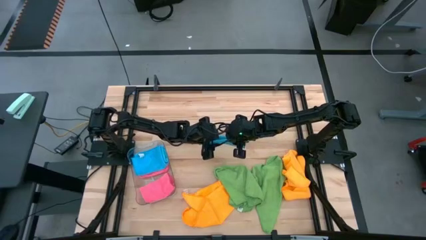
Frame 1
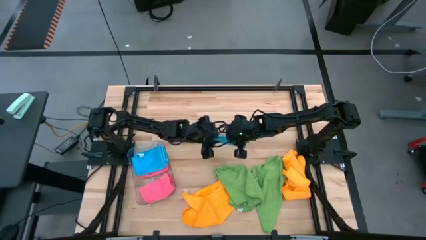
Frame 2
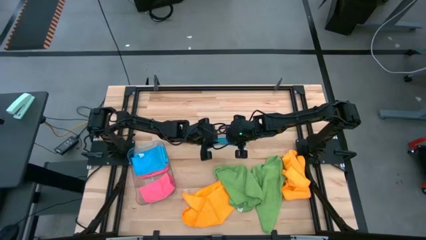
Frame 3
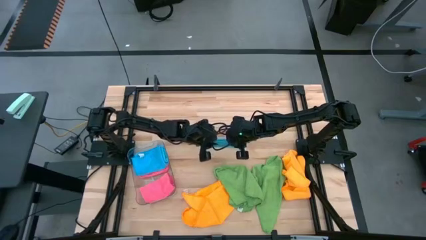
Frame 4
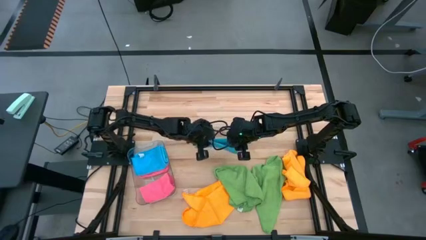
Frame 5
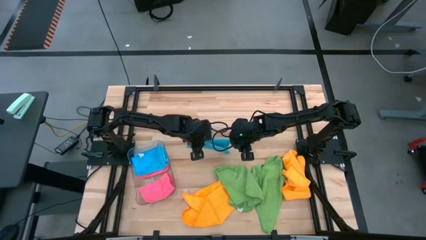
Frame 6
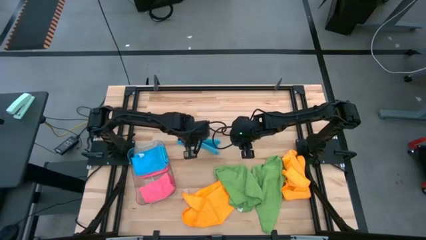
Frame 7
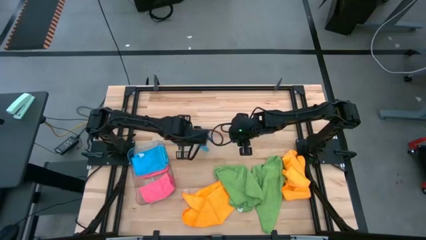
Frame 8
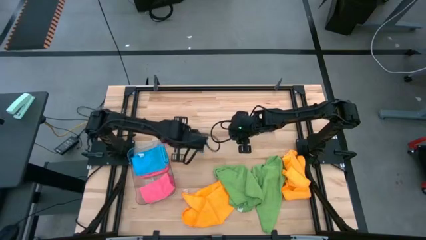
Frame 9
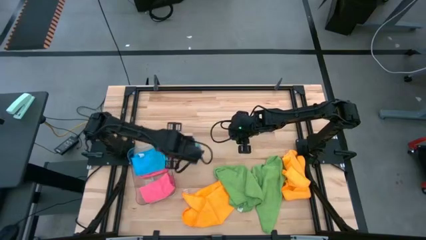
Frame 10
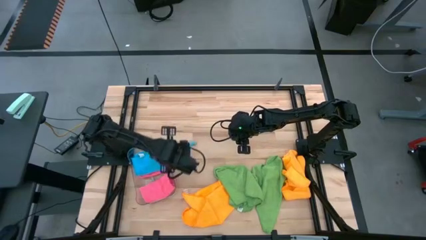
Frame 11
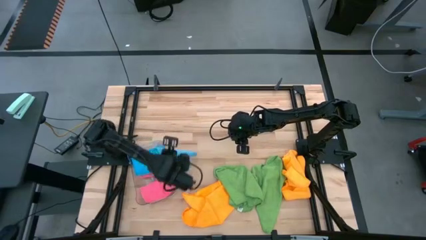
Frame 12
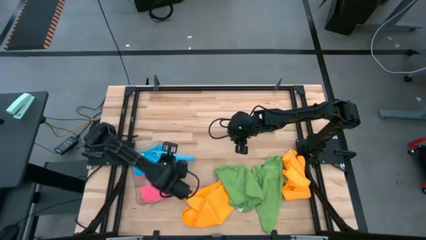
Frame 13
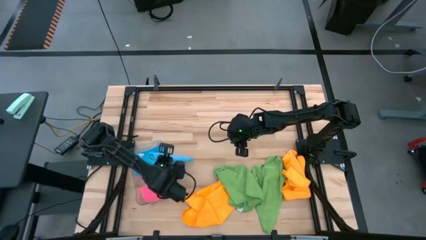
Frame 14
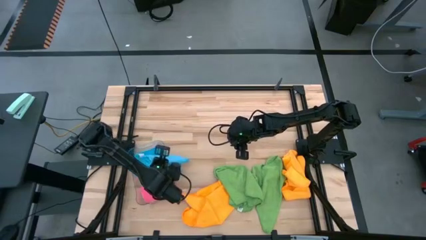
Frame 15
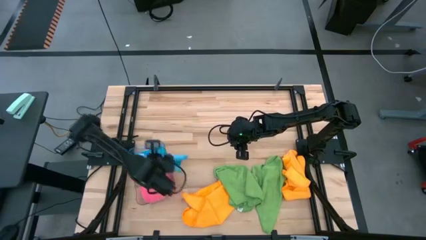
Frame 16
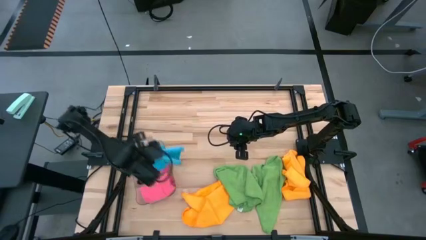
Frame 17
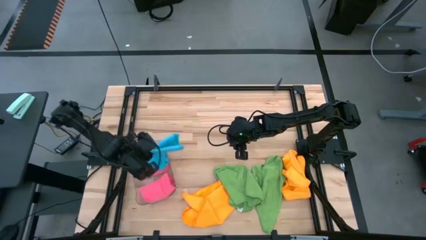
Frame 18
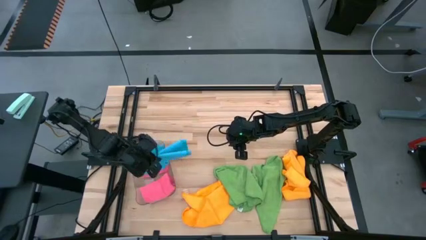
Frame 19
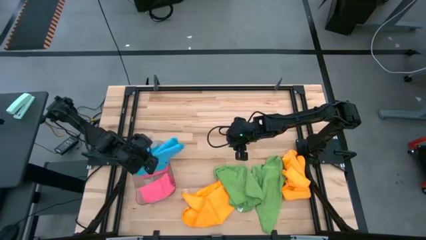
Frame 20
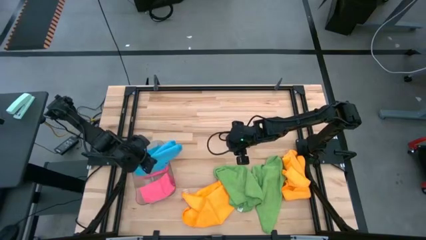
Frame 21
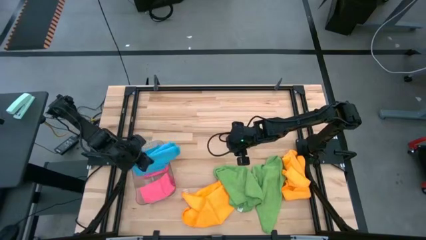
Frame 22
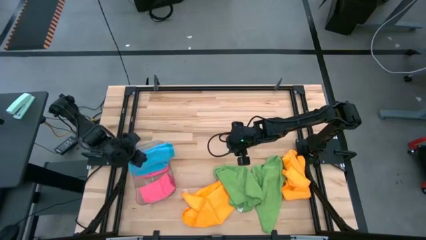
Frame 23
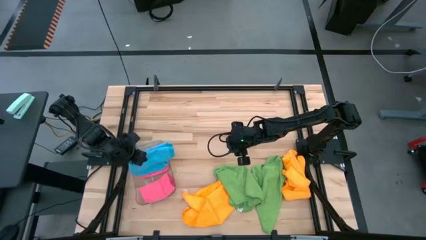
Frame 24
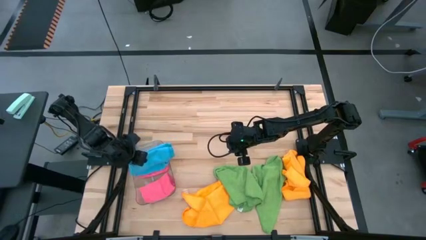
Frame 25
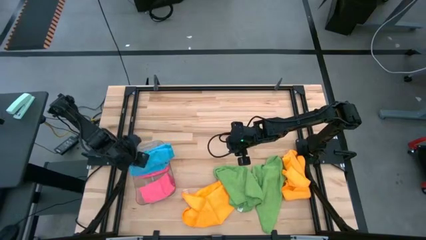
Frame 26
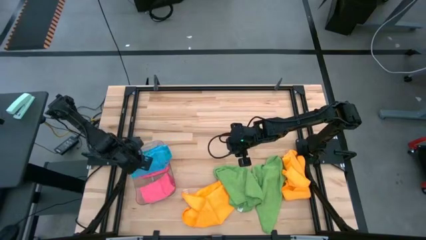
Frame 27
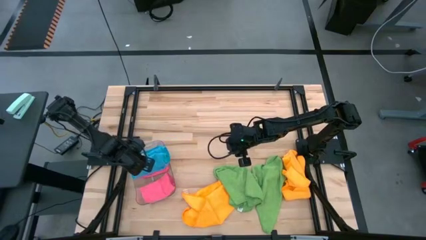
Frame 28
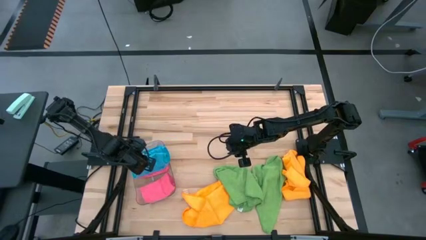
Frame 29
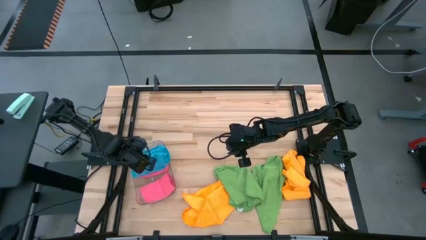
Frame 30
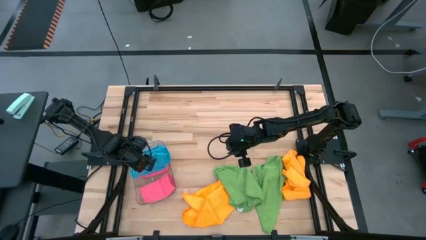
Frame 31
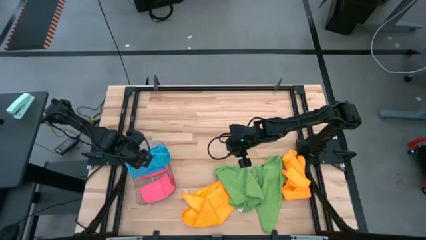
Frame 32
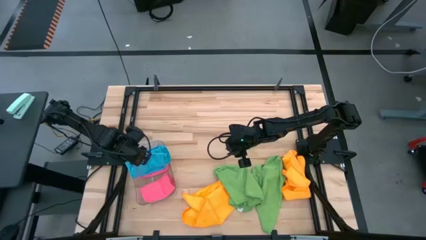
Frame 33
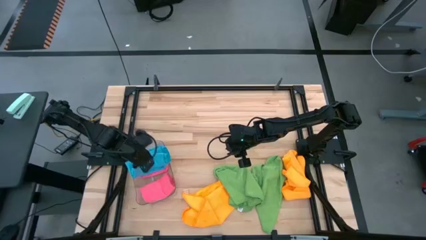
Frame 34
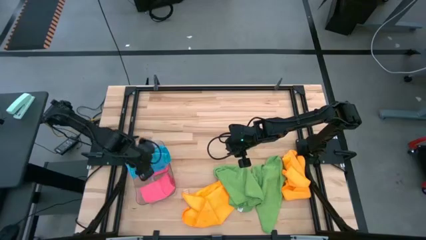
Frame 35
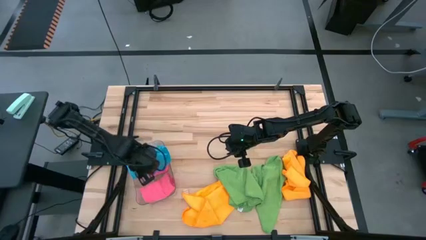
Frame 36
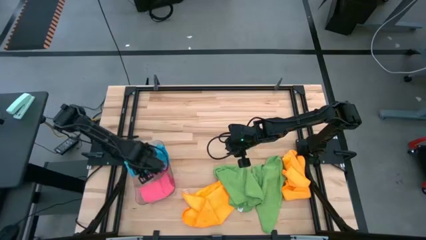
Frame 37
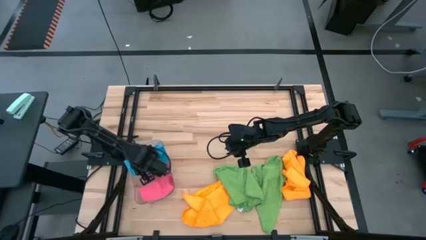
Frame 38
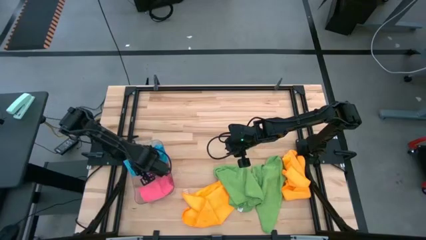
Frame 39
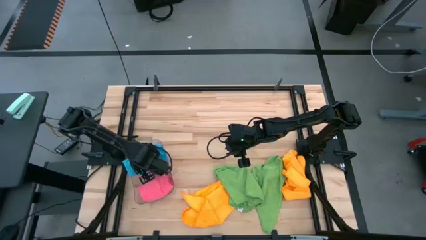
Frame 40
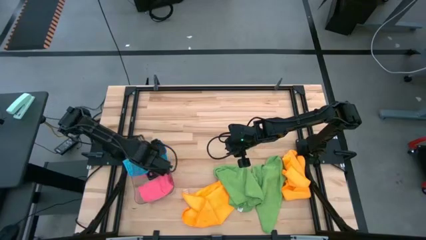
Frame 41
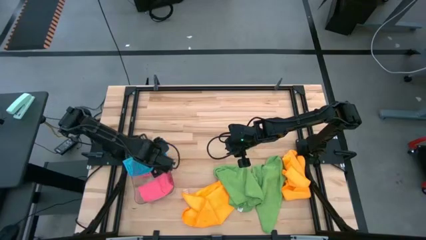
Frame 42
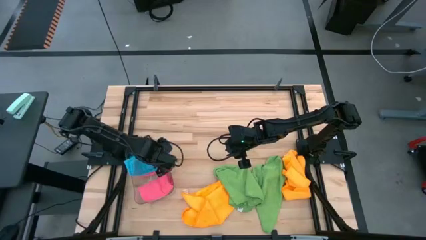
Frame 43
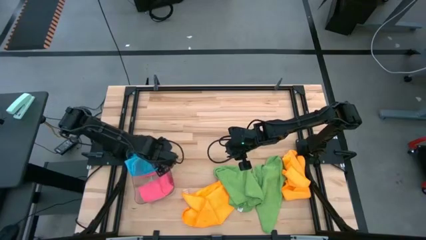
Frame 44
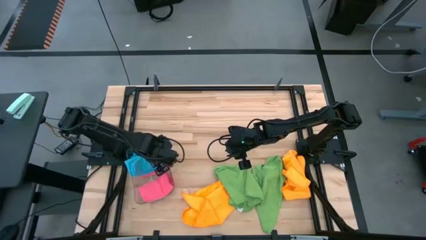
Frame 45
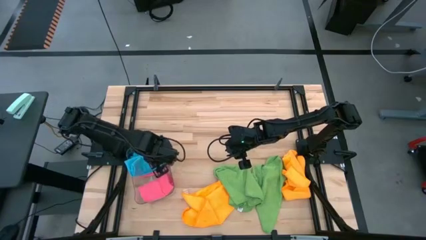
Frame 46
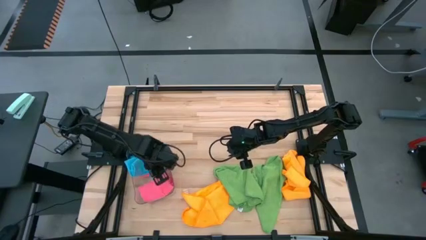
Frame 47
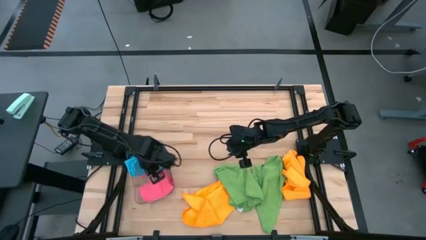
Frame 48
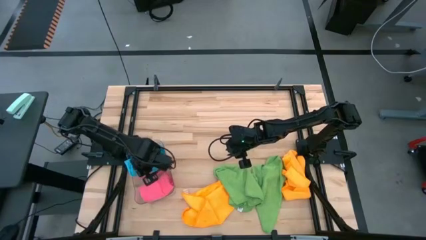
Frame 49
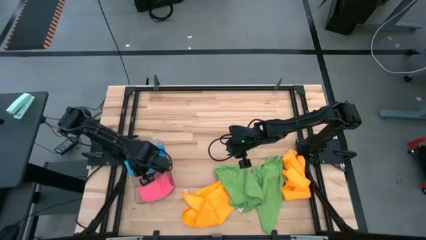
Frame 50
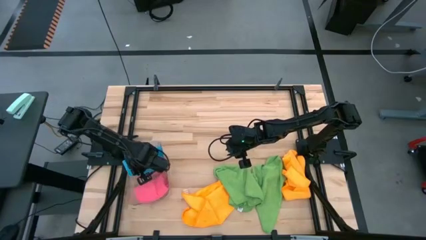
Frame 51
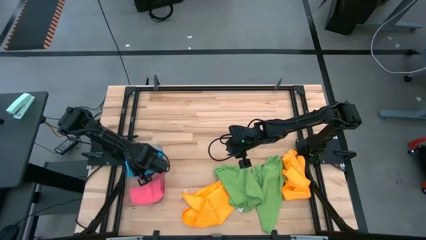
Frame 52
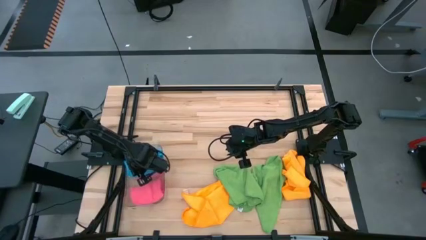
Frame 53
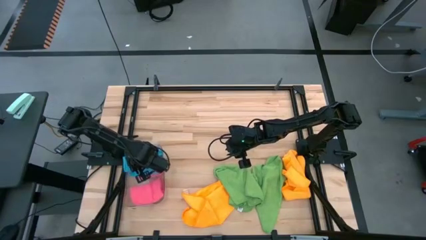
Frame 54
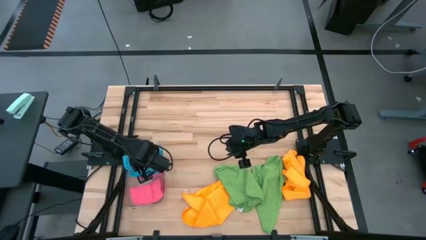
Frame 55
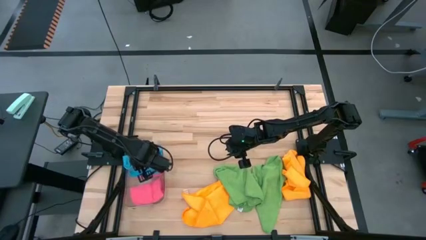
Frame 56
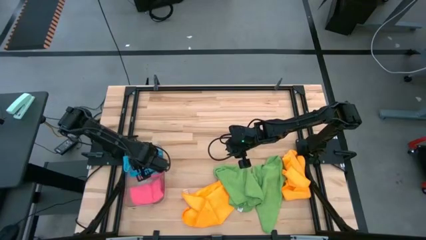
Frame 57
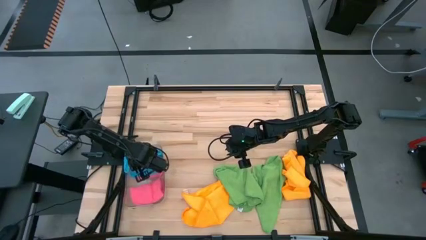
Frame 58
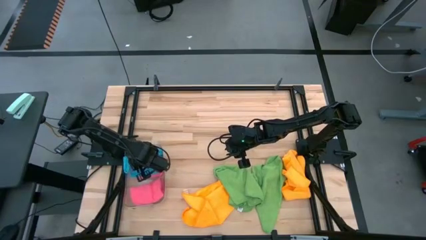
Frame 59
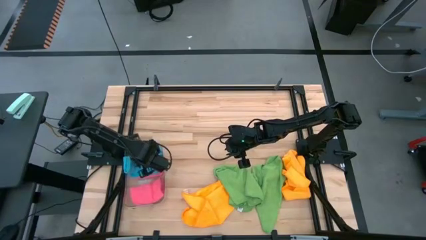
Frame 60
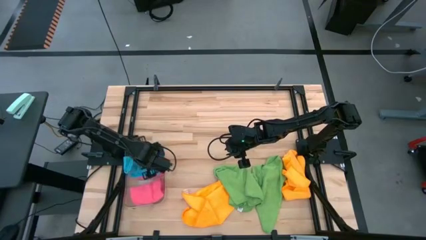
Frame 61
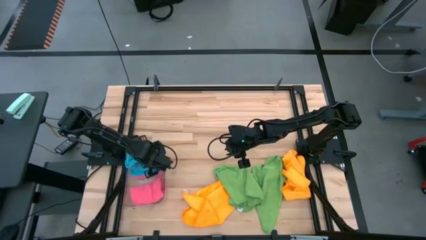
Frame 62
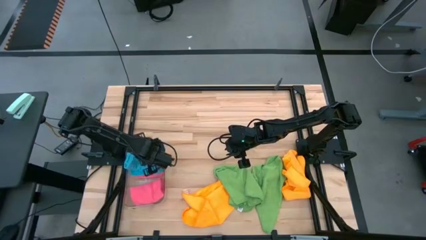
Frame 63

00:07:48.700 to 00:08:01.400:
Task: Fold microfiber towels
Put the blue microfiber cloth into the transparent bin

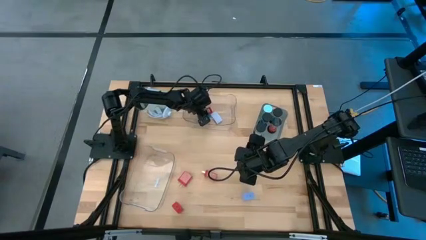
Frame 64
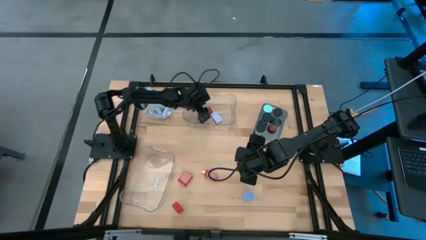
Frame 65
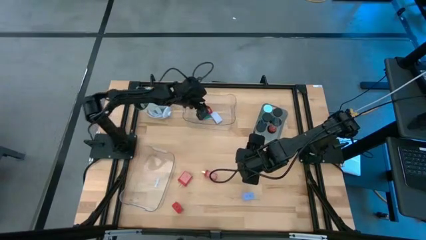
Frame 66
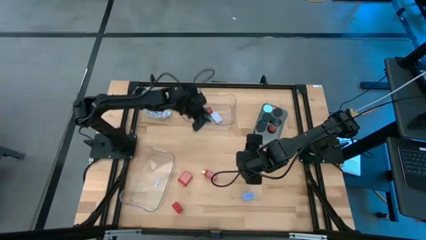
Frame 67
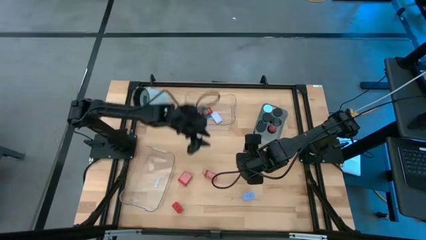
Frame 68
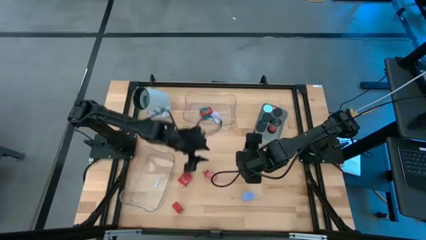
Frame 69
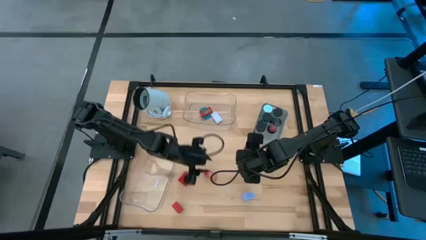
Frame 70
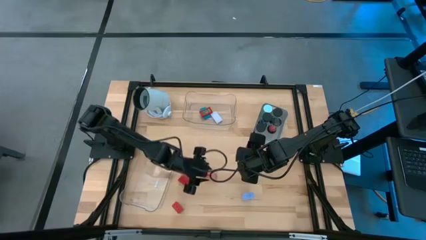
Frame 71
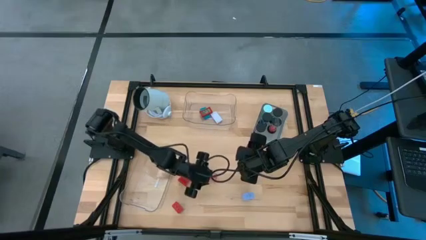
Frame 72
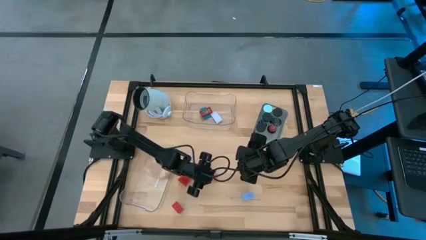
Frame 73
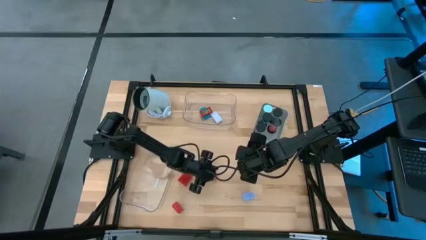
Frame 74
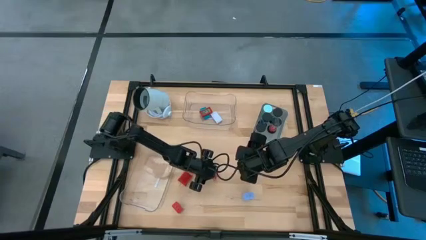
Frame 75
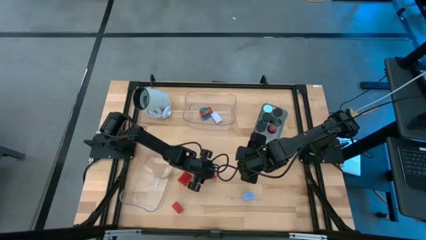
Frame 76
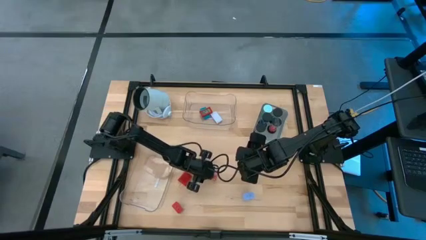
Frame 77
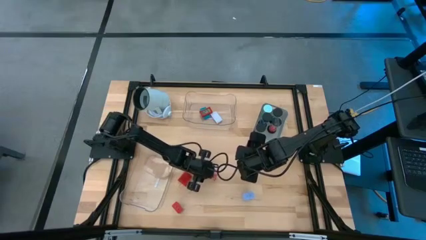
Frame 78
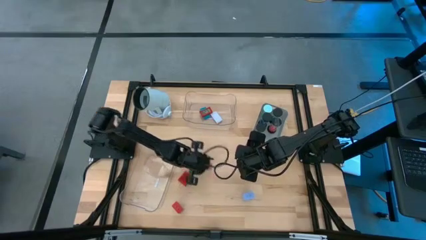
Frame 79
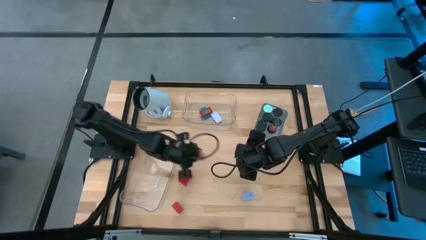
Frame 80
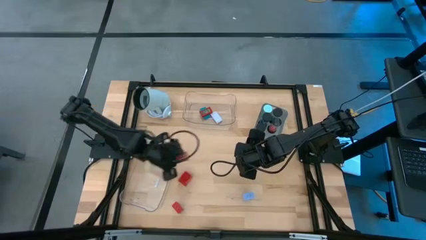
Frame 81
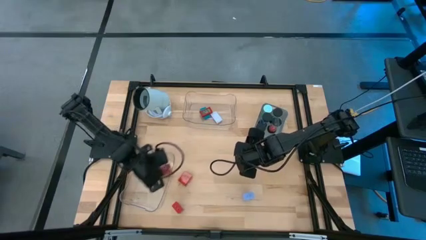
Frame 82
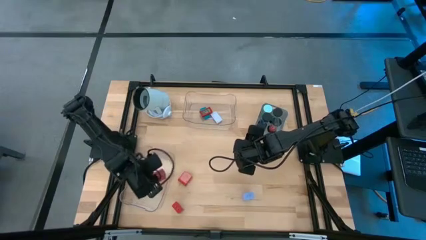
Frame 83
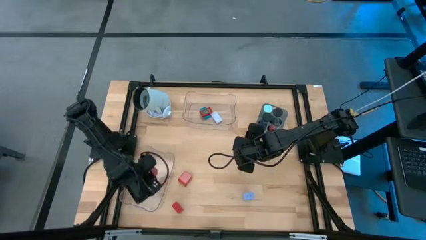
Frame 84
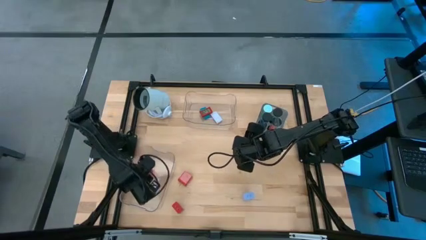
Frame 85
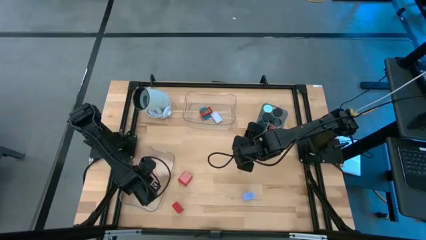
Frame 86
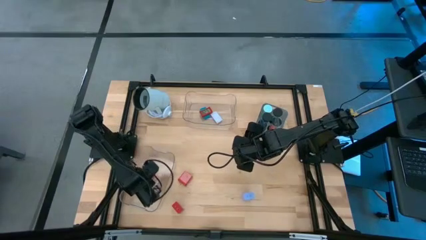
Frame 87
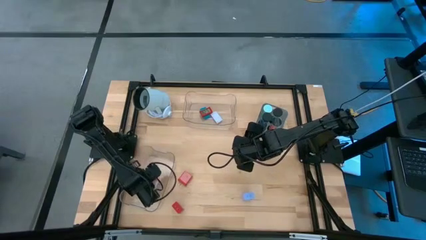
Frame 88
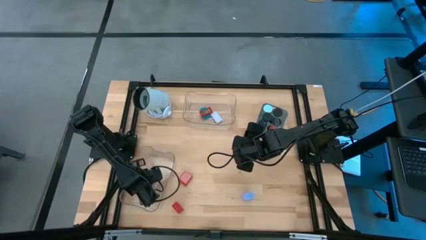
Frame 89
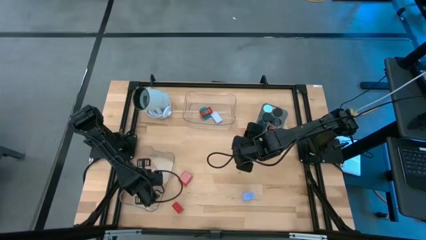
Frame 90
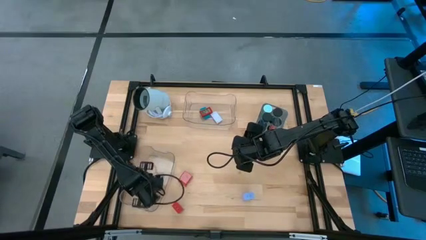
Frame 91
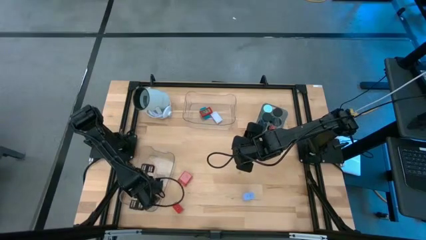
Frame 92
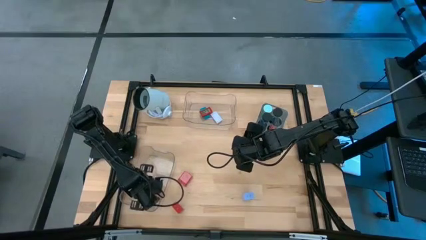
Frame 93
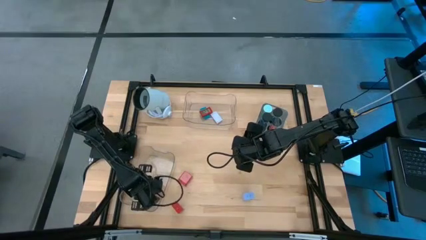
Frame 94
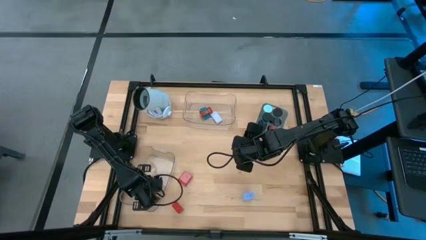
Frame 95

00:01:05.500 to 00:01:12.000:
Task: Pick & Place Office items
Put the top right red USB adapter into the left clear bin
